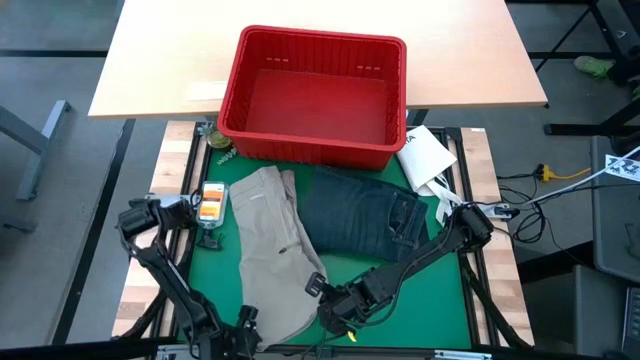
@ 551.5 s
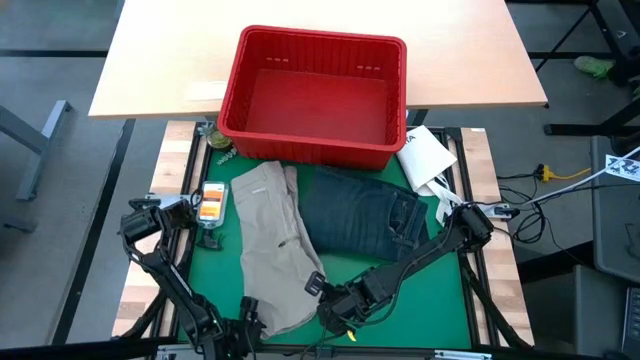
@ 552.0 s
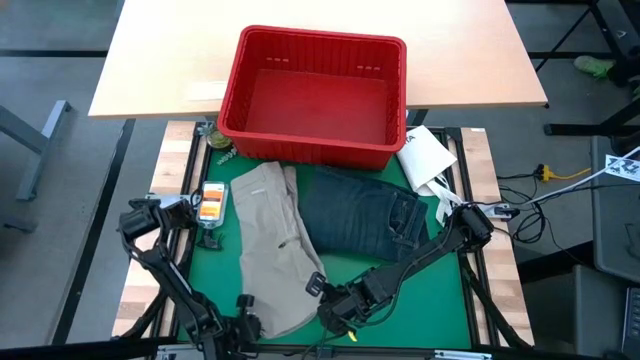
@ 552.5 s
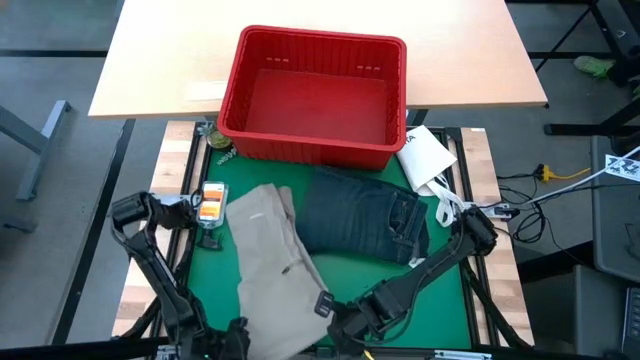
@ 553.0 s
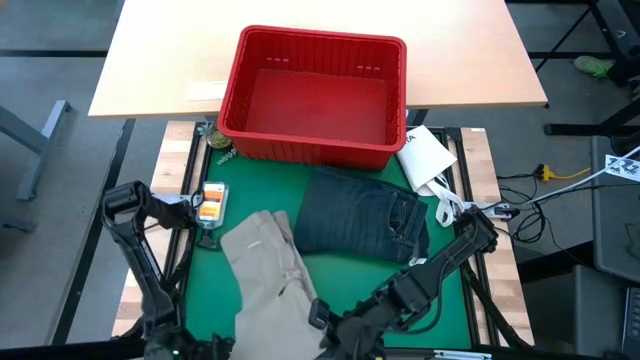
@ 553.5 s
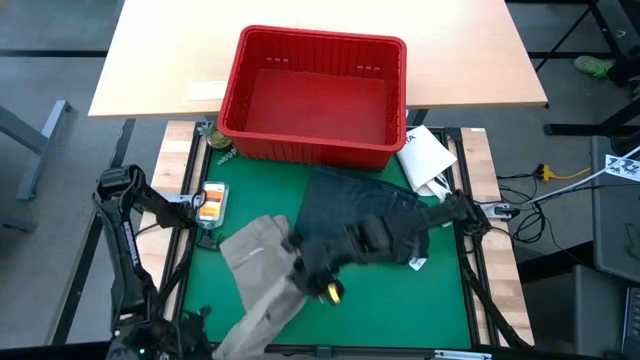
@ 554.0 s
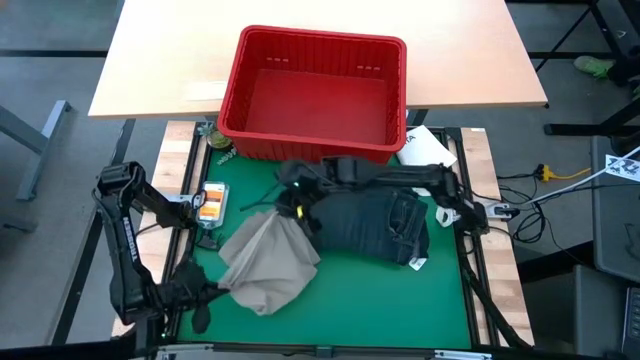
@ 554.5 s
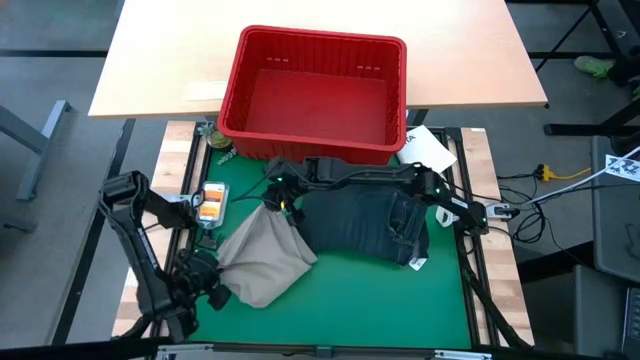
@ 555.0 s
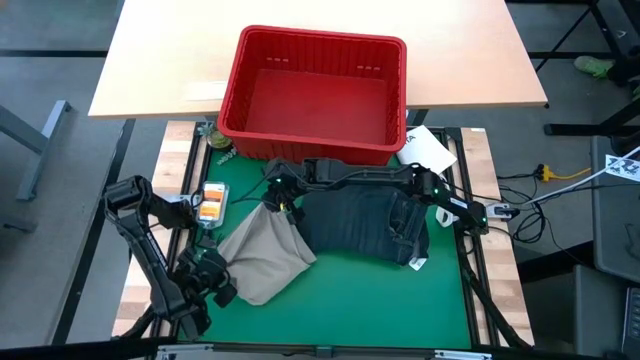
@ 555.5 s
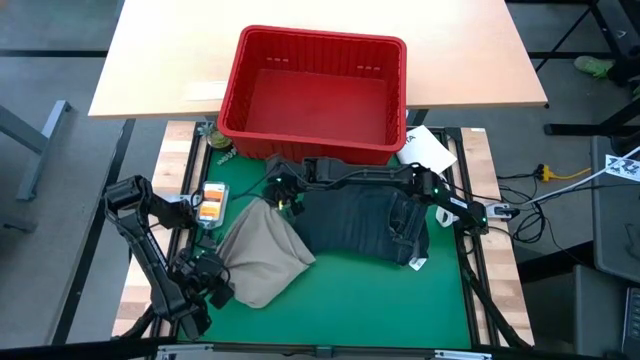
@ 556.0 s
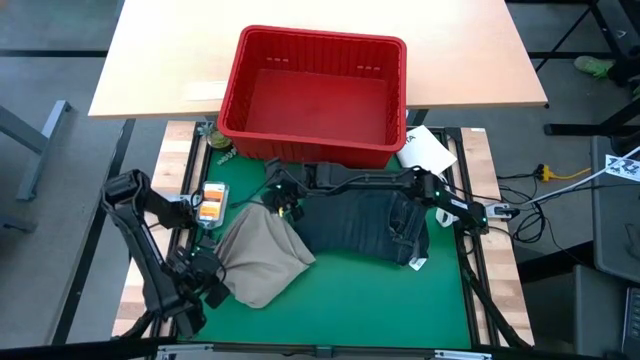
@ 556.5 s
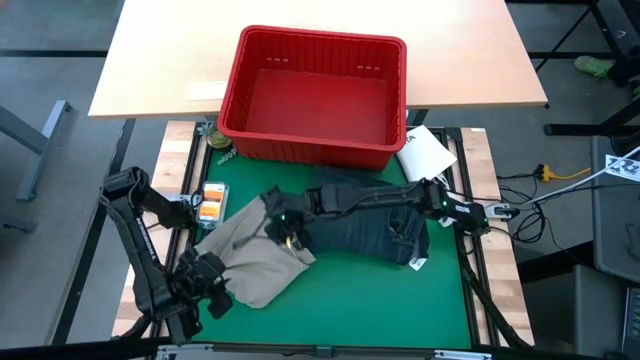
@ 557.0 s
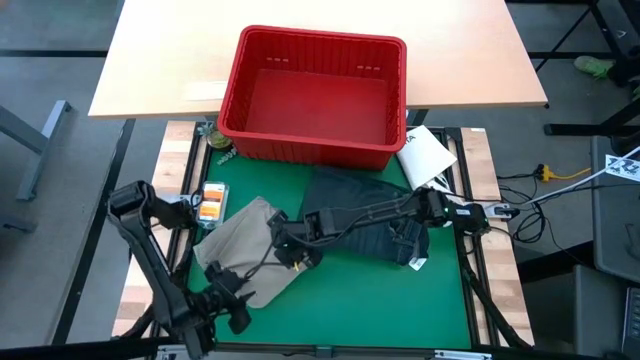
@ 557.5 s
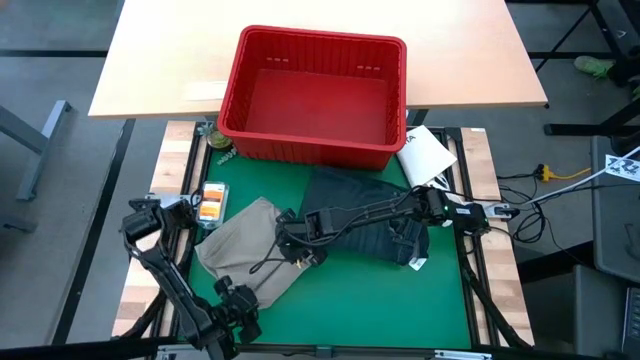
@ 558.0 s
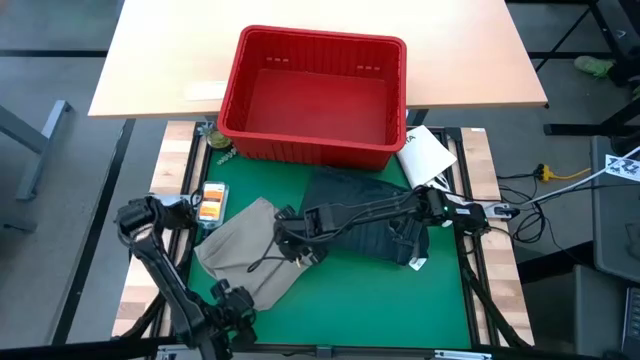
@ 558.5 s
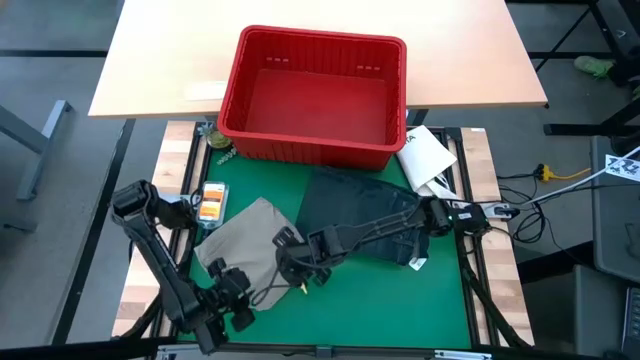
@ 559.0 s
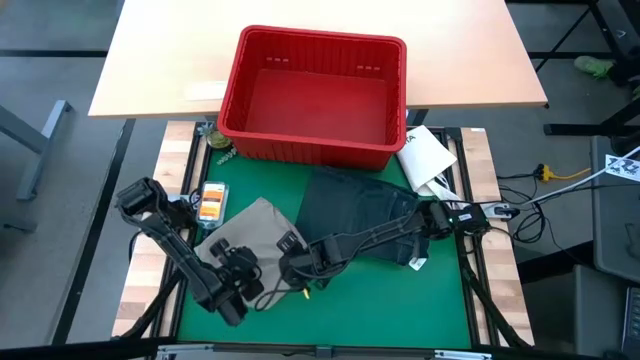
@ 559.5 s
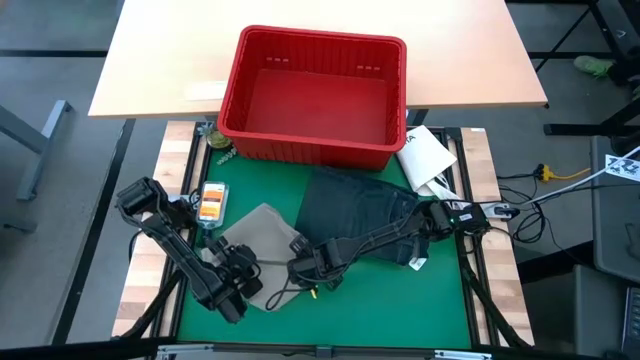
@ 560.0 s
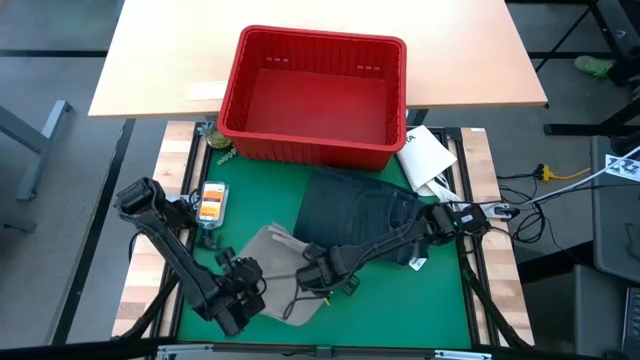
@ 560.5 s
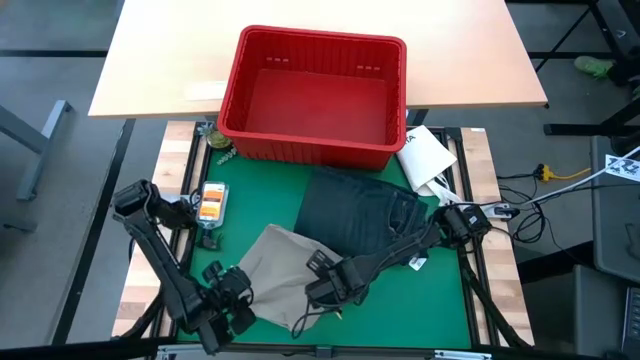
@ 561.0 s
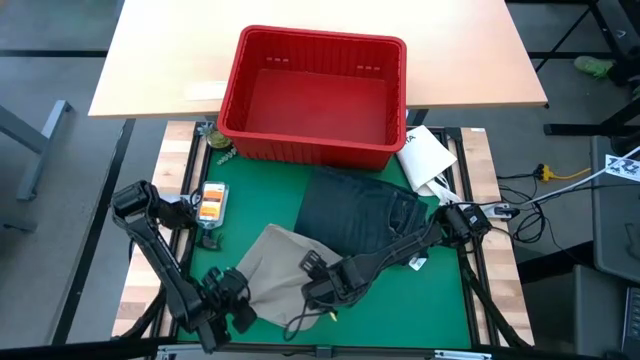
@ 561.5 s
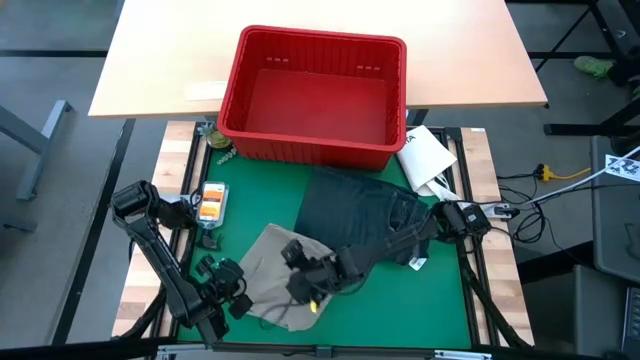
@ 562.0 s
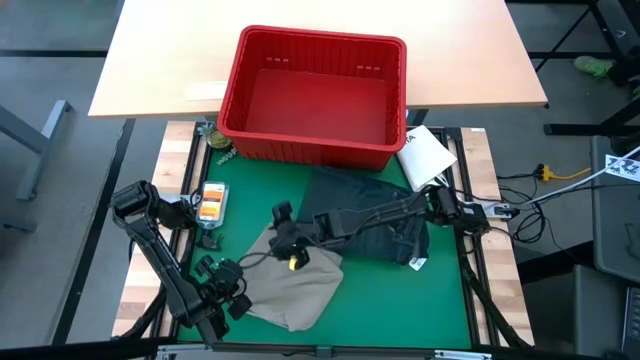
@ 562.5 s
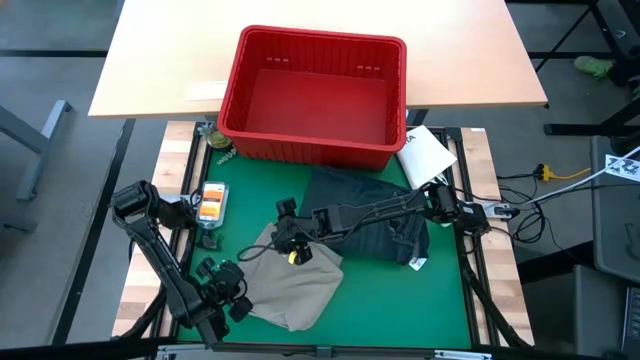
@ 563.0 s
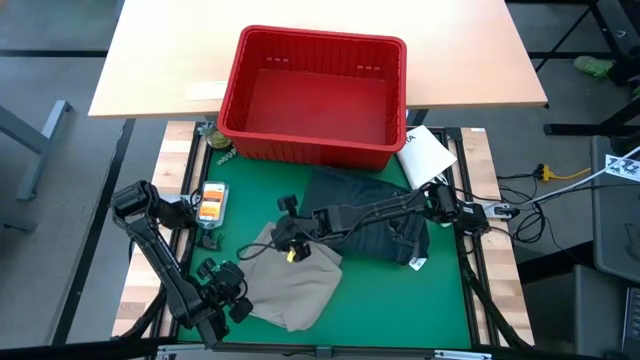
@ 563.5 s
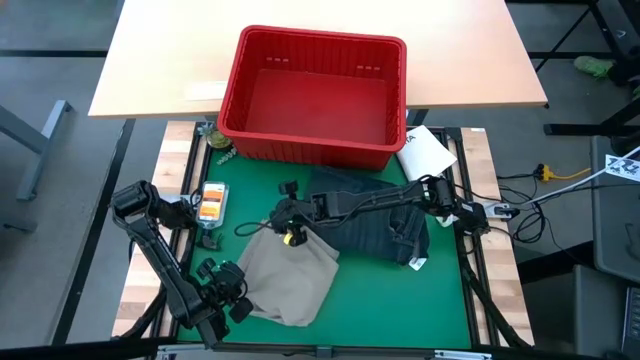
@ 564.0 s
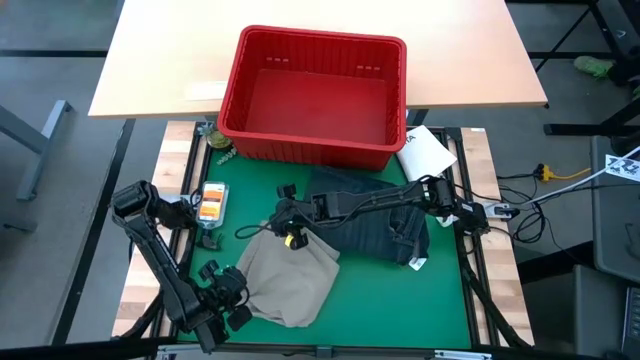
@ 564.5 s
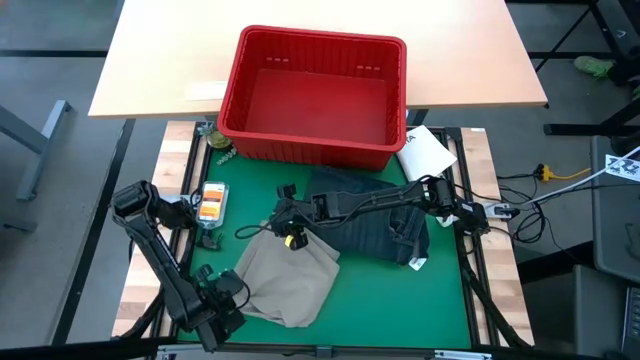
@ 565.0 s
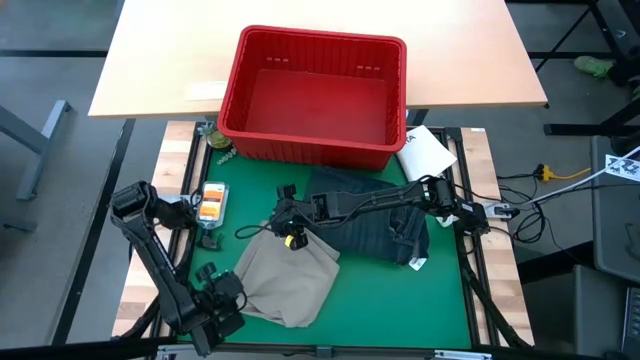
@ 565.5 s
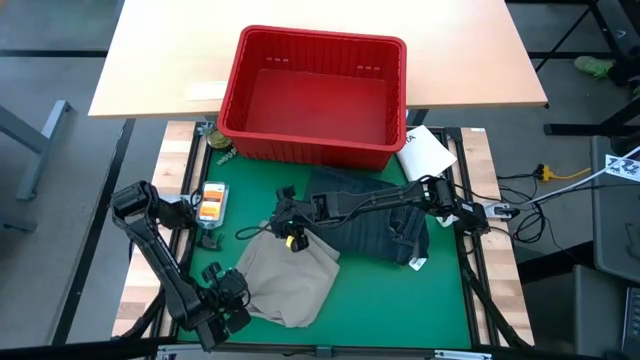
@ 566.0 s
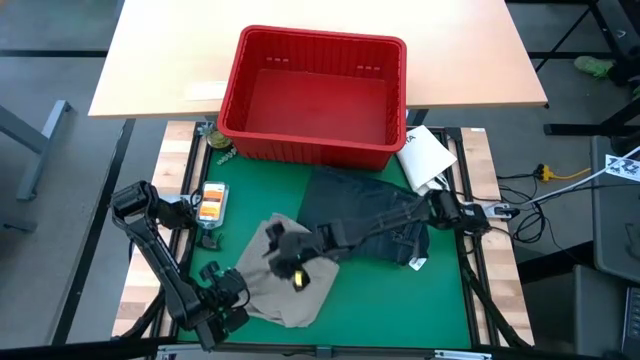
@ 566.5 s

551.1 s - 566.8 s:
Task: Fold Laundry from Bin
Fold the gray shorts

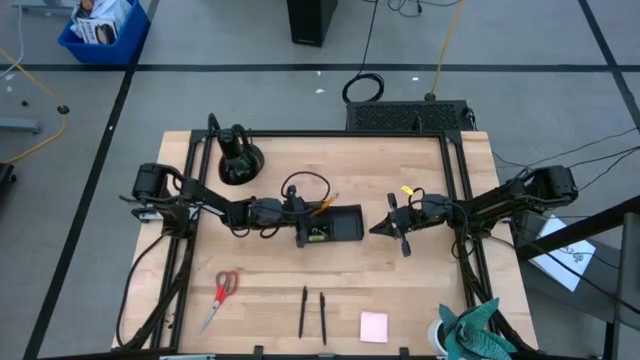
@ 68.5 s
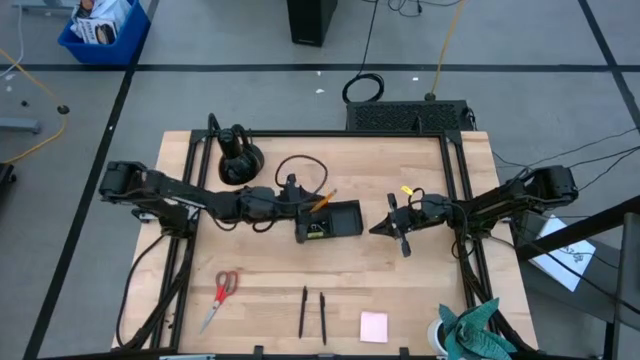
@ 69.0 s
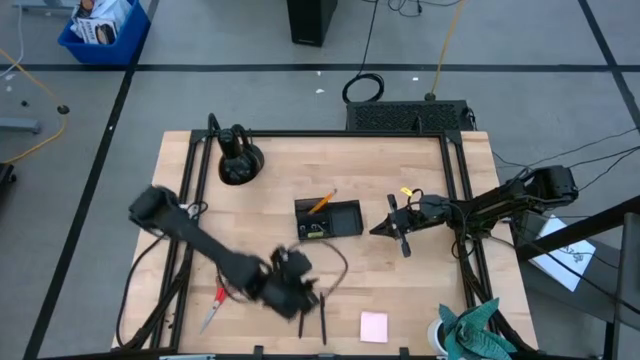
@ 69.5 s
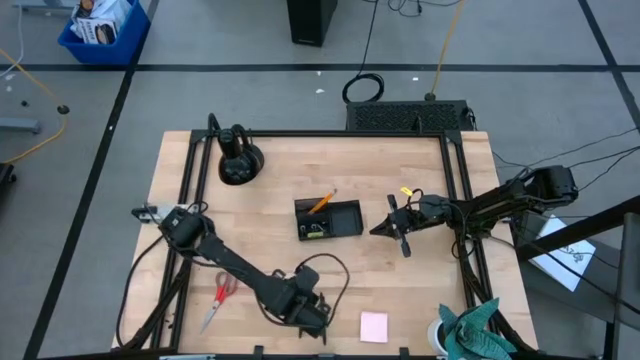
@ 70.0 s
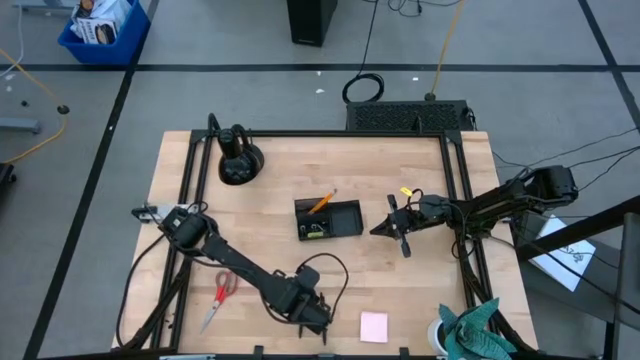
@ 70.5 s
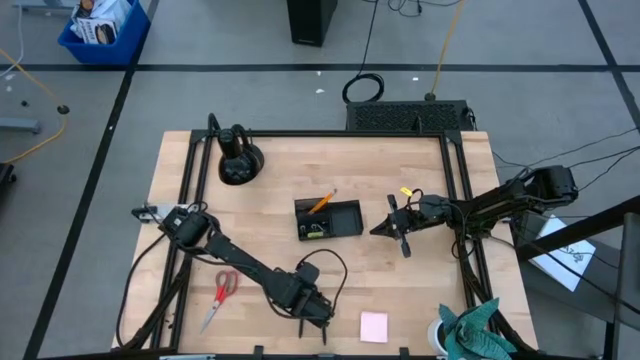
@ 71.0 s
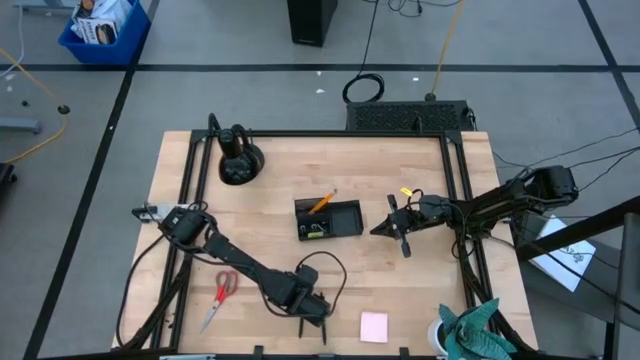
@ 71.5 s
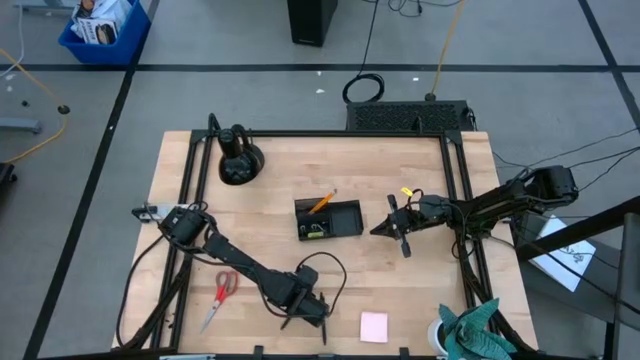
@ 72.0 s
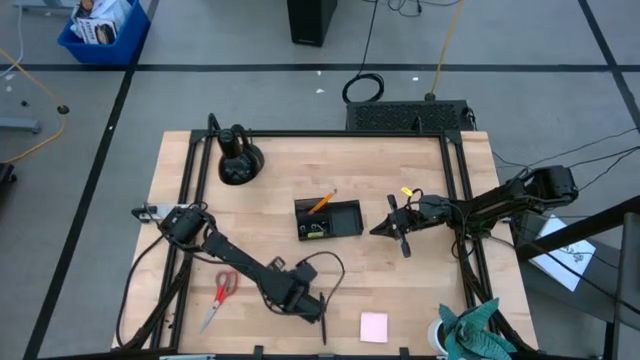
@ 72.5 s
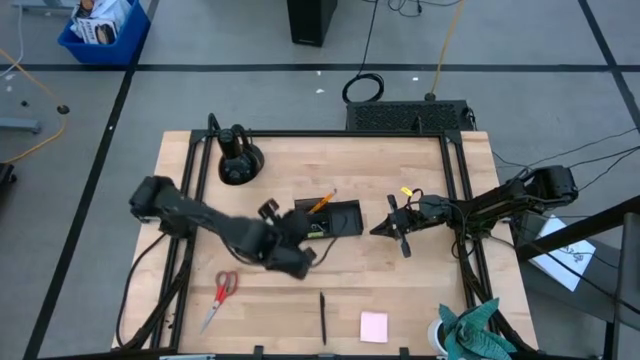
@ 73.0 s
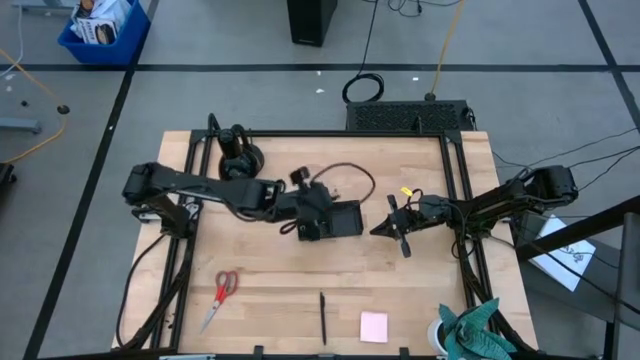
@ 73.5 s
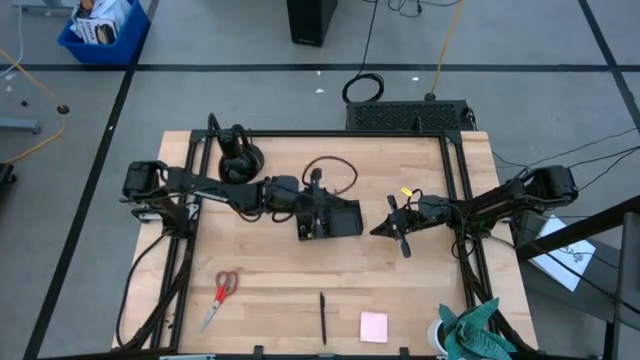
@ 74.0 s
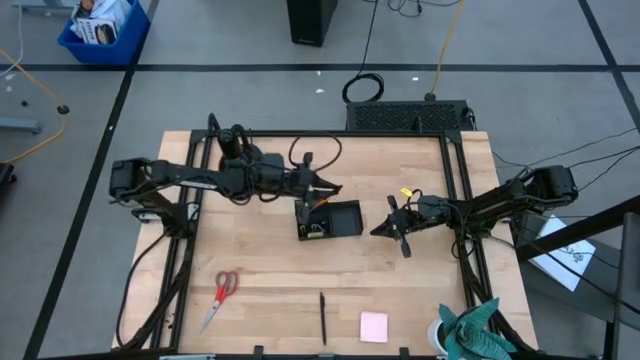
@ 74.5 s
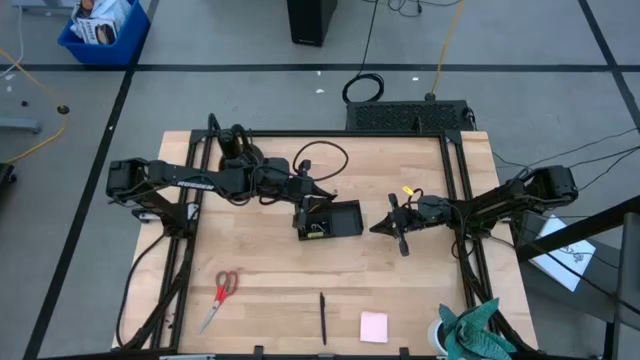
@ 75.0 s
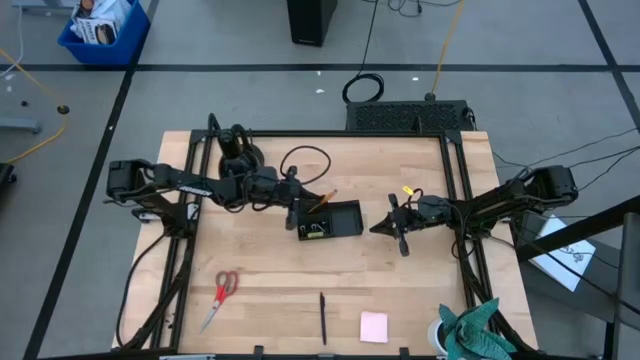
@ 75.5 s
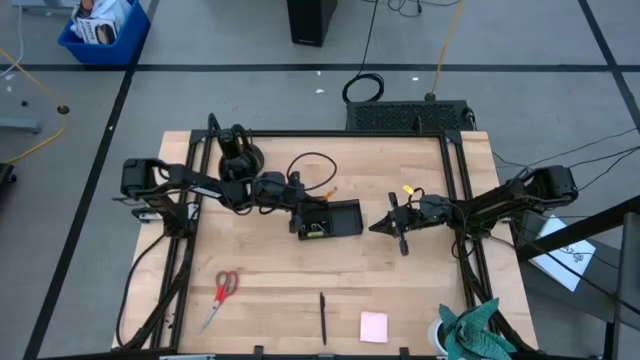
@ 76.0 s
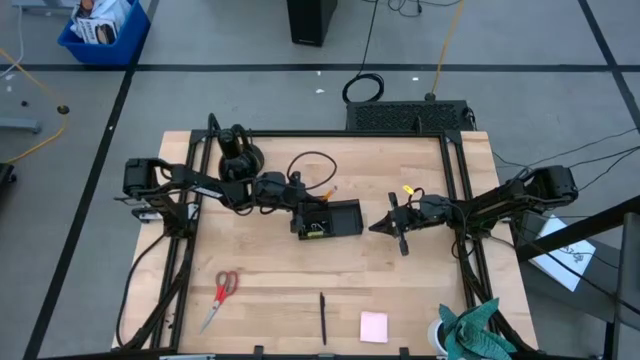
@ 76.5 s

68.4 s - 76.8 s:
Task: Pick and place office supplies into organizer
Put the black pen into the black desk organizer
